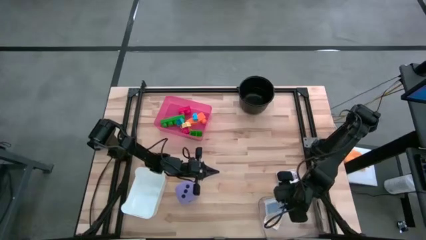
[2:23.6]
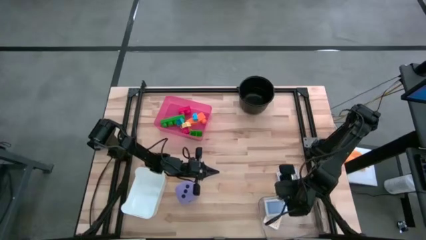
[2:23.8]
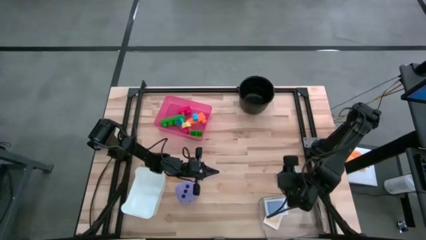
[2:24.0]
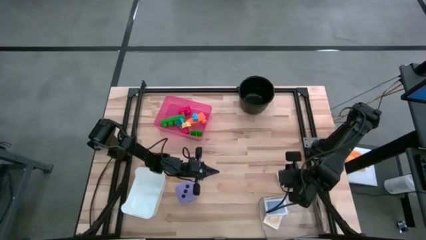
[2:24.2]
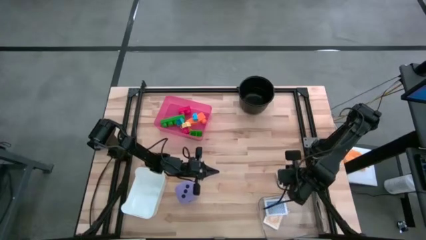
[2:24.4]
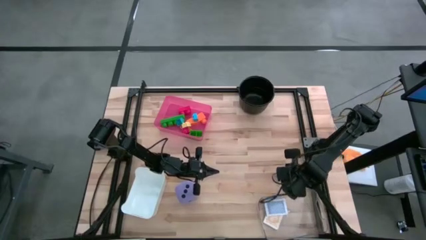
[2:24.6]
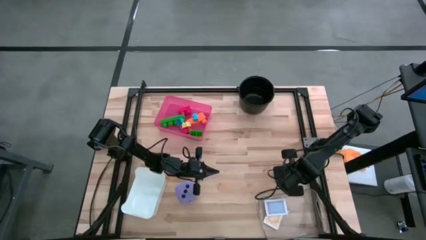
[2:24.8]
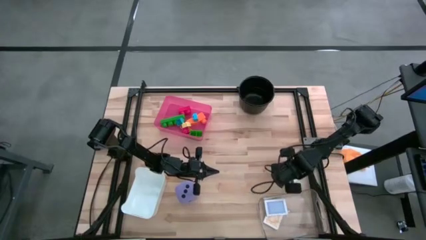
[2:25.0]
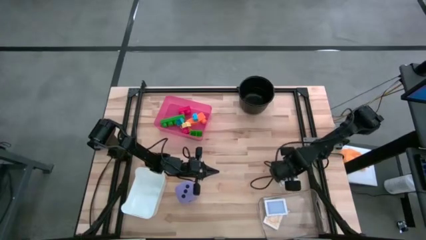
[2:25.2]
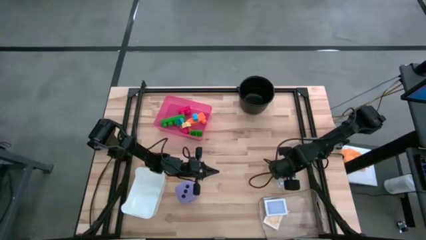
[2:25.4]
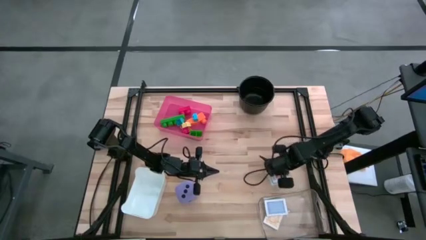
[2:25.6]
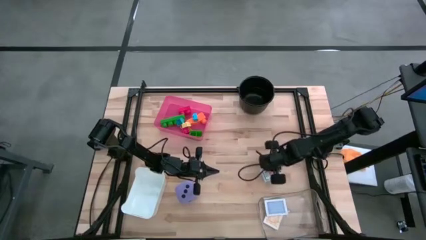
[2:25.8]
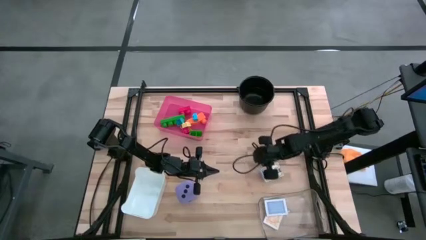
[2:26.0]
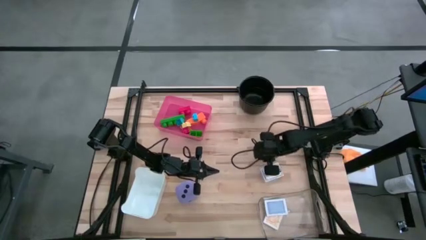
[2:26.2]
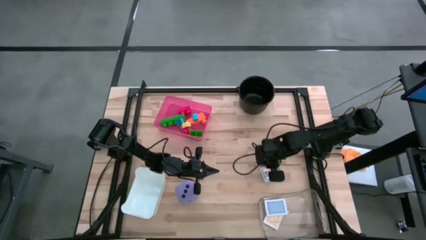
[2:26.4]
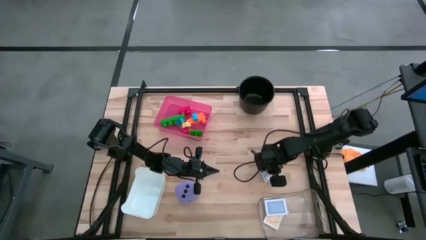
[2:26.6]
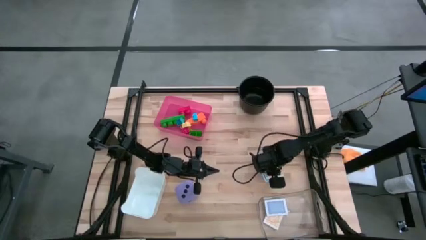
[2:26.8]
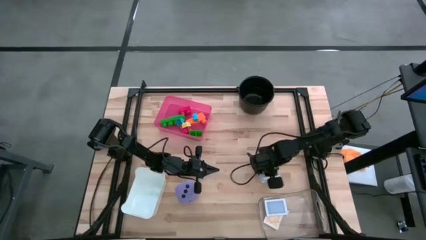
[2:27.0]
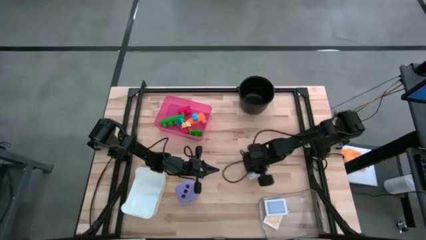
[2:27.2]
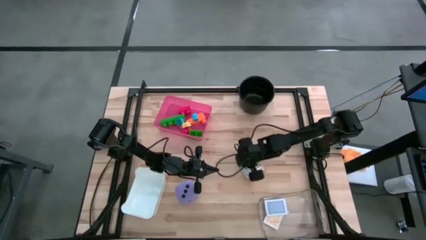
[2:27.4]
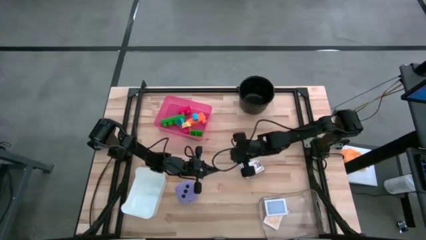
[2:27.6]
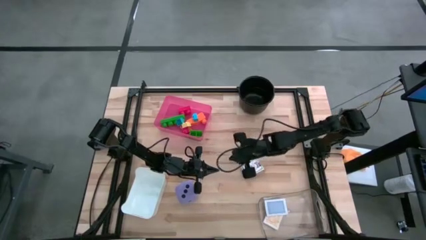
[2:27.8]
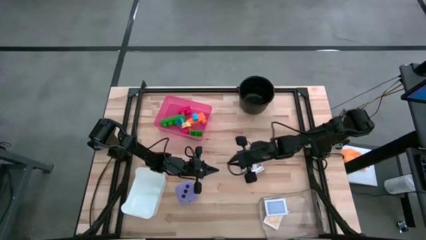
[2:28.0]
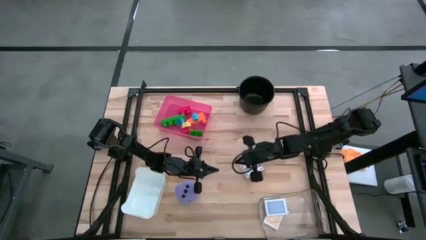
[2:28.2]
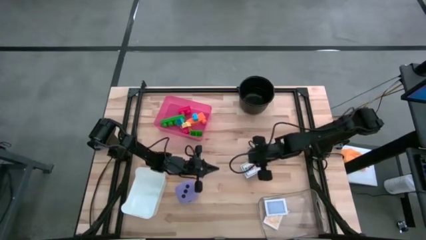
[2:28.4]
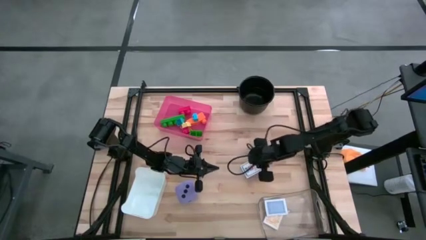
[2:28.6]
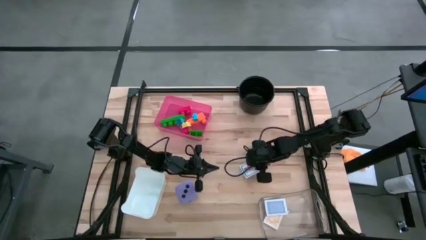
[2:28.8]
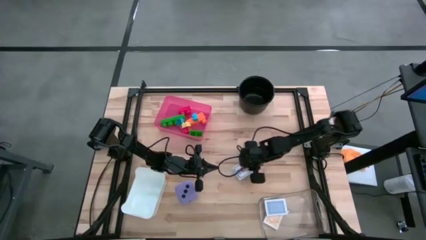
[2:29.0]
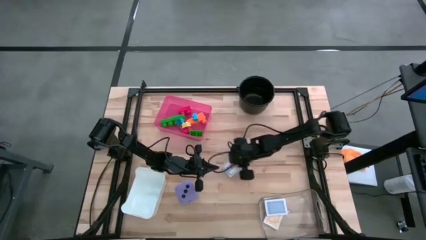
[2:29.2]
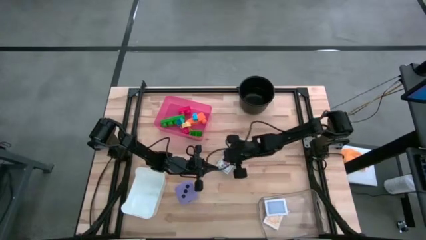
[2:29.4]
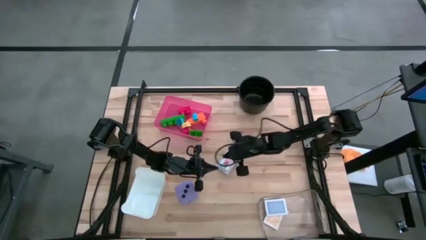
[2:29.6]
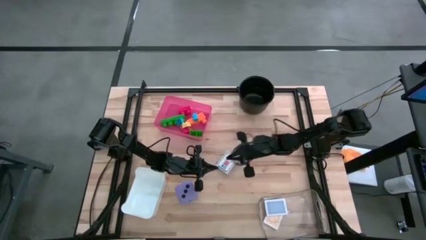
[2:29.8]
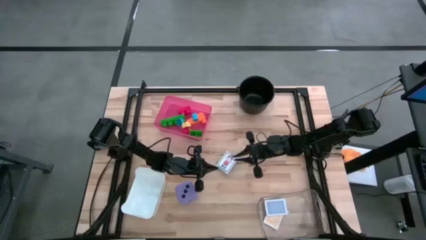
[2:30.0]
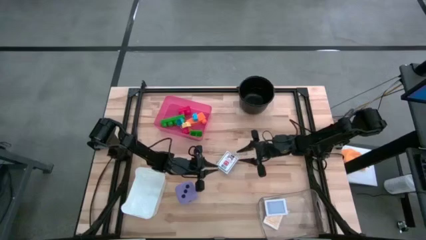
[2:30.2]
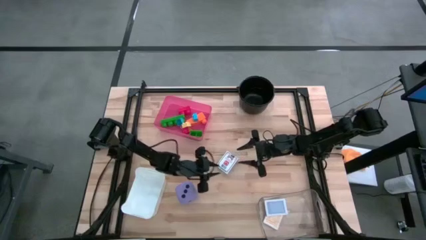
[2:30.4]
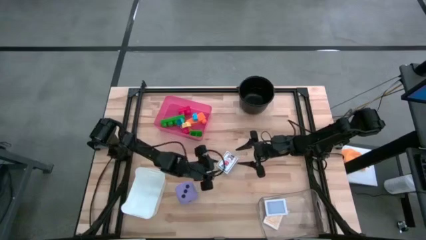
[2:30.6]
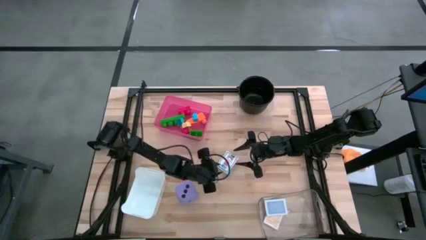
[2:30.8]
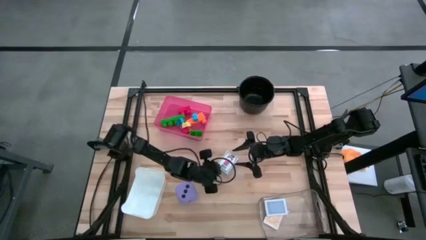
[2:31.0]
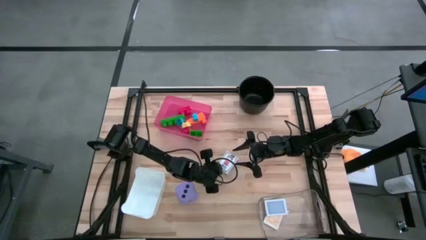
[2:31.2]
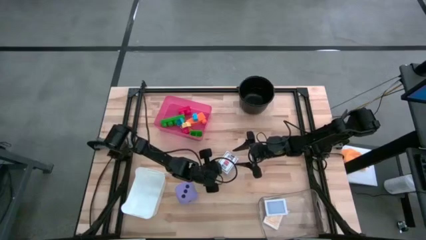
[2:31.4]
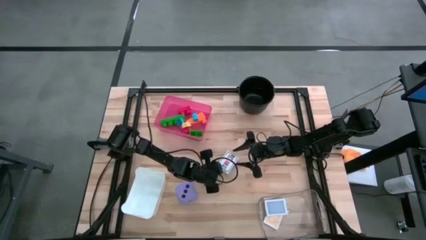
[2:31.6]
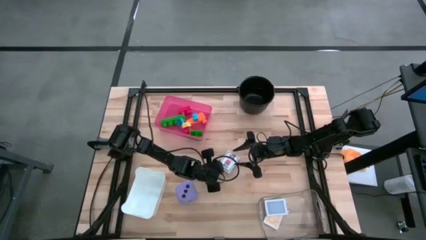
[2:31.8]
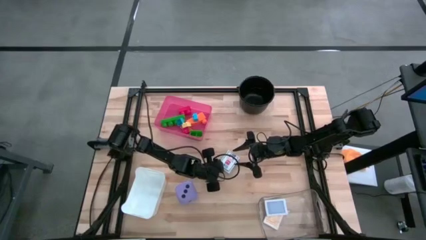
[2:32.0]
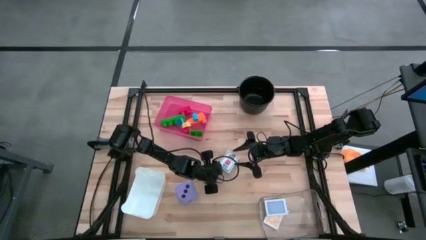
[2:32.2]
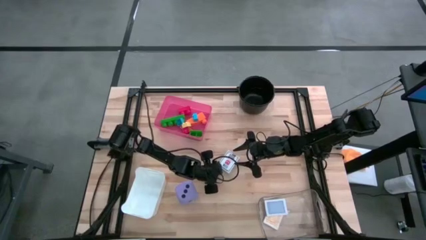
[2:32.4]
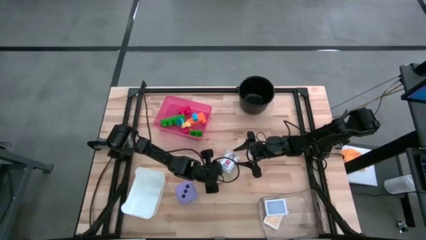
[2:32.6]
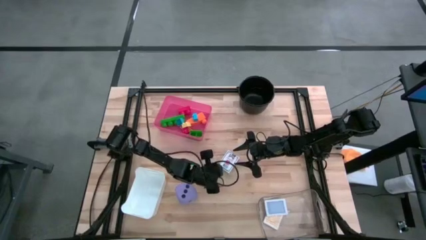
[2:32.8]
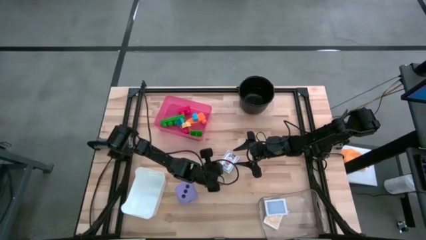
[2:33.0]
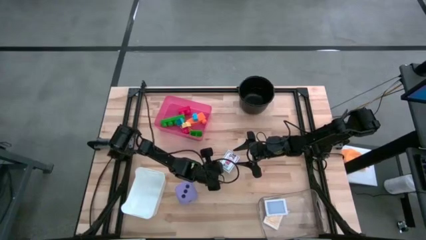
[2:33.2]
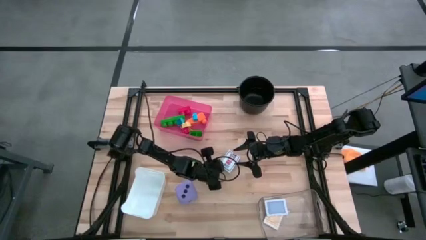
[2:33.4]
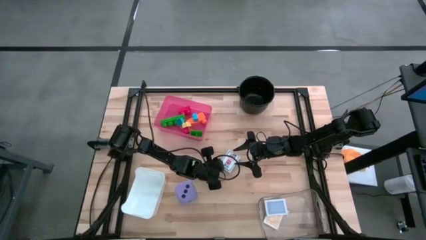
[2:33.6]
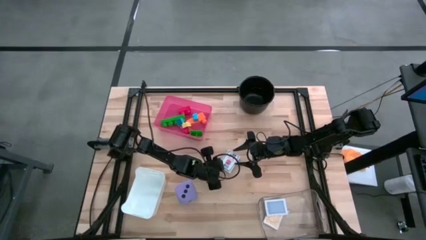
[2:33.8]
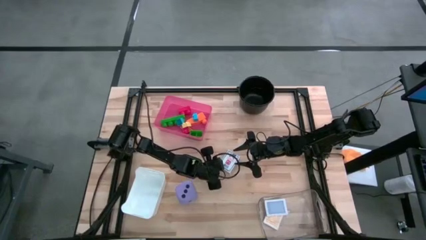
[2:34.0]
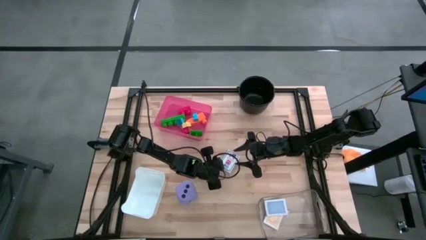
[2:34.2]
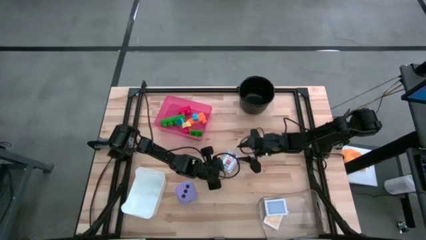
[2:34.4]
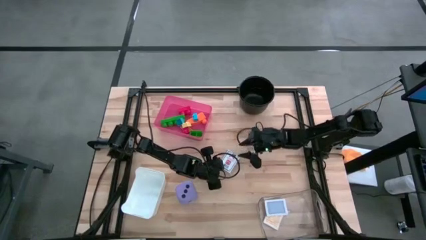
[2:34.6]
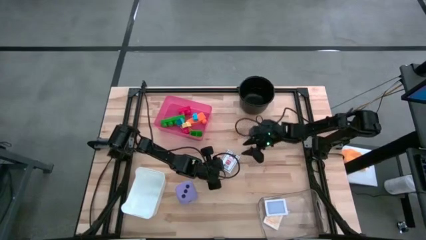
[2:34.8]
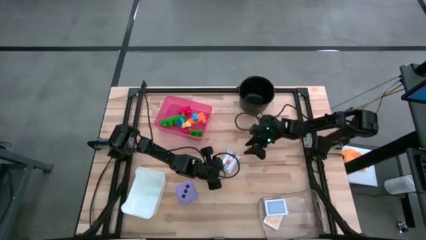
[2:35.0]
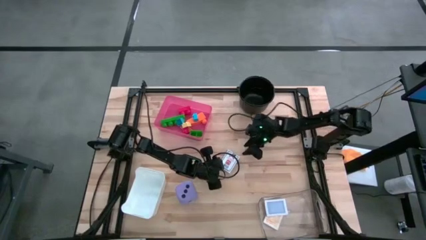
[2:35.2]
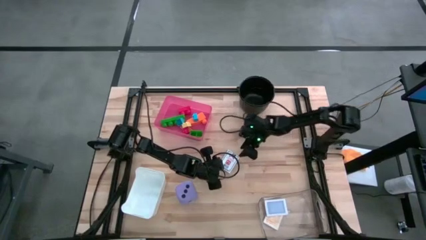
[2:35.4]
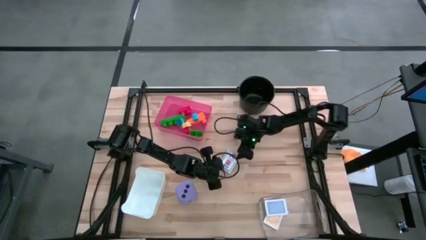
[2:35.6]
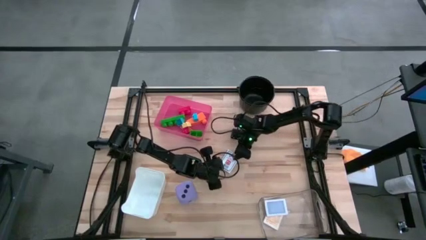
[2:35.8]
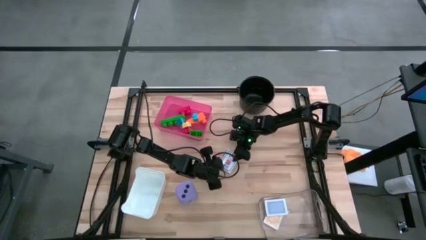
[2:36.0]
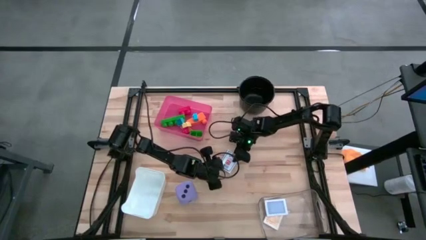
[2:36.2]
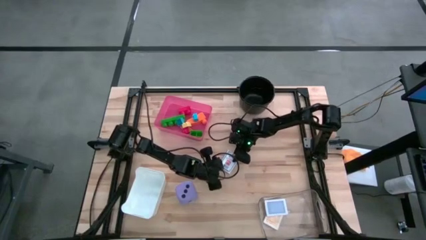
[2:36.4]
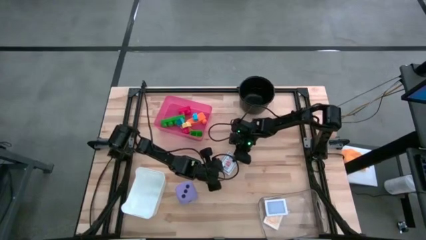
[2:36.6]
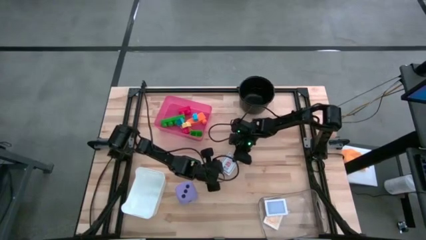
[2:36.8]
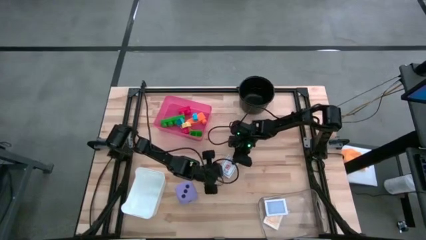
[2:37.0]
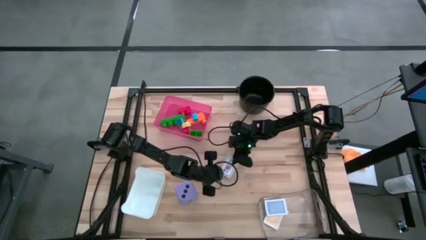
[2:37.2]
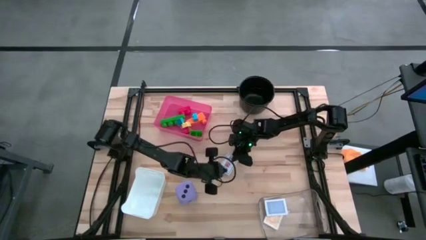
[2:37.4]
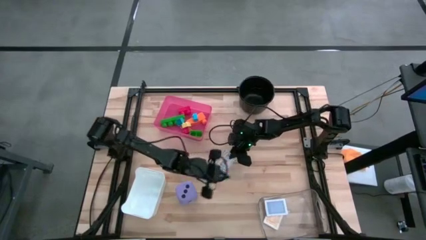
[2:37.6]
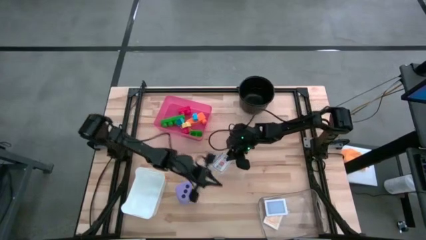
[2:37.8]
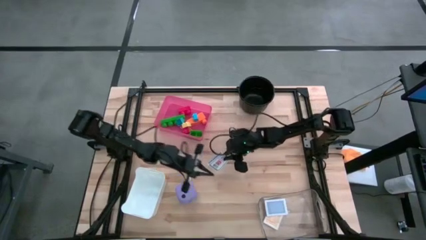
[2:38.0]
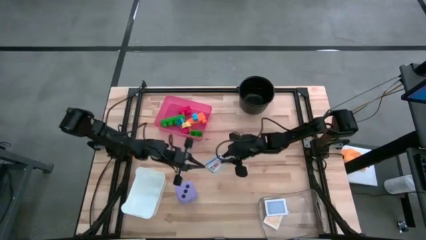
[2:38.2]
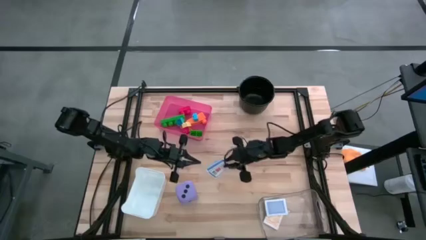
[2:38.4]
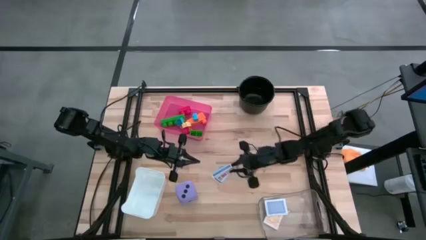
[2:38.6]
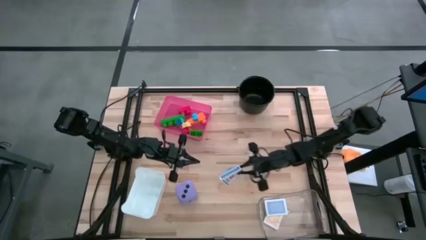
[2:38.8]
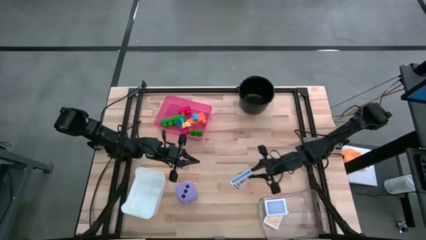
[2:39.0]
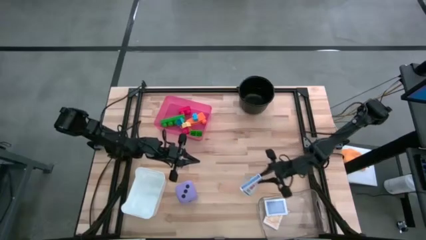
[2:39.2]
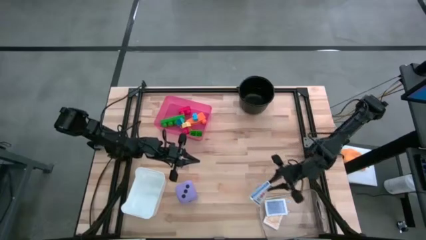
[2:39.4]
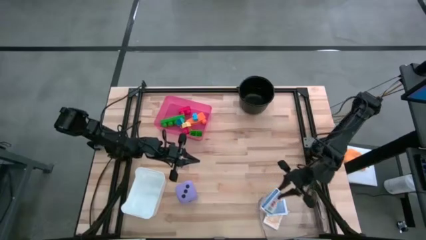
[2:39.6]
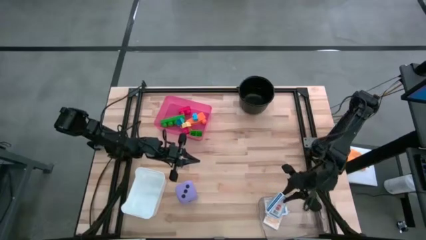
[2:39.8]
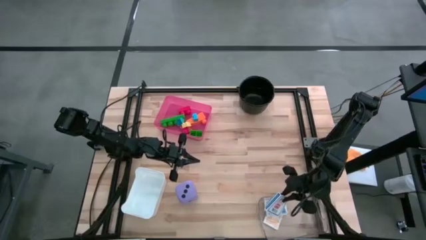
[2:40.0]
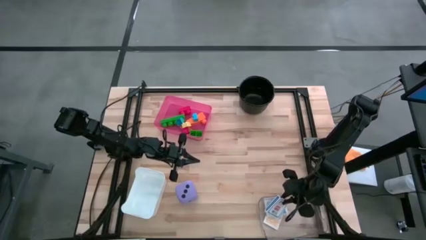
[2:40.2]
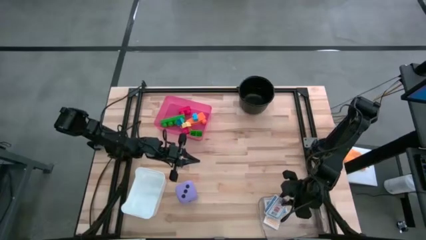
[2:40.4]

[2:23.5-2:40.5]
Task: Pick & Place Toys
Put the white deck of cards into the transparent bin
